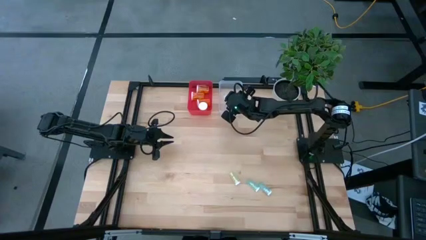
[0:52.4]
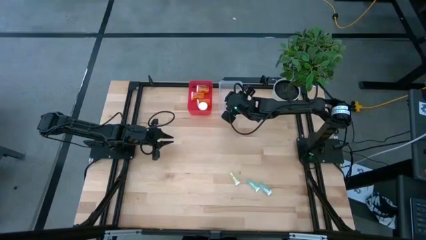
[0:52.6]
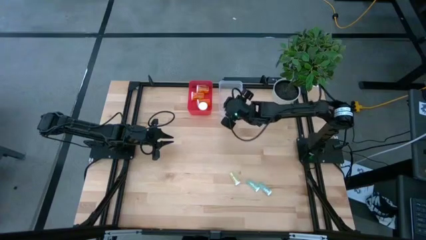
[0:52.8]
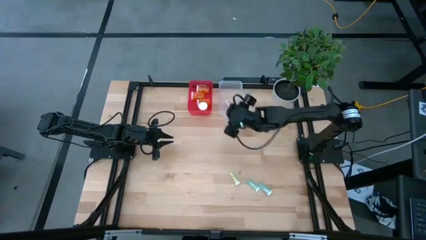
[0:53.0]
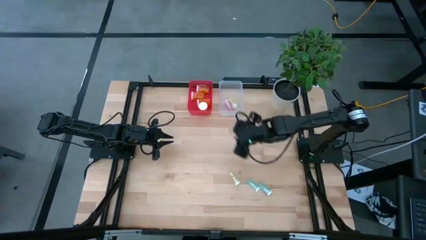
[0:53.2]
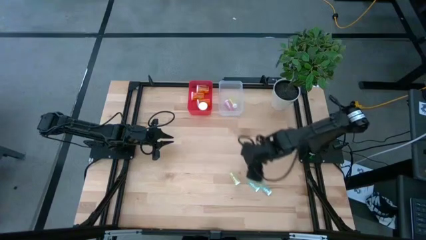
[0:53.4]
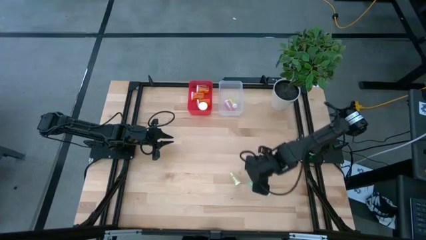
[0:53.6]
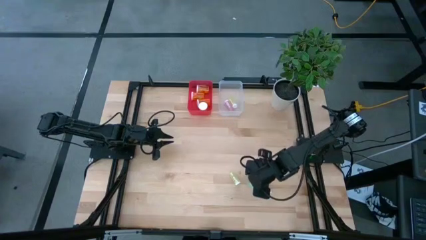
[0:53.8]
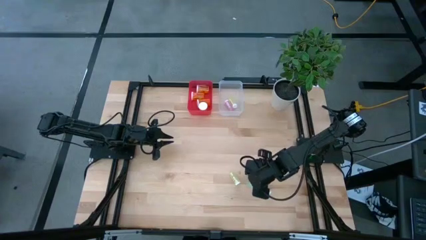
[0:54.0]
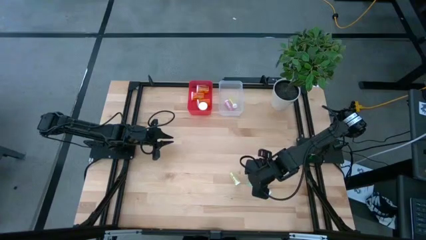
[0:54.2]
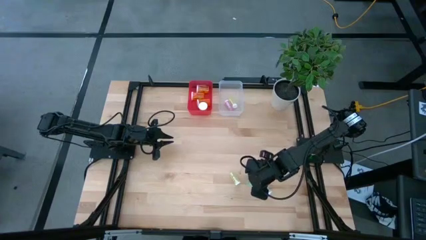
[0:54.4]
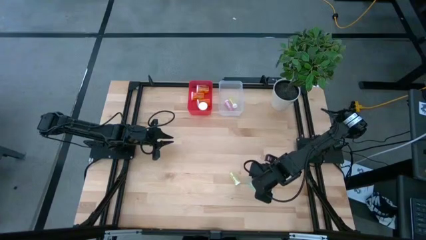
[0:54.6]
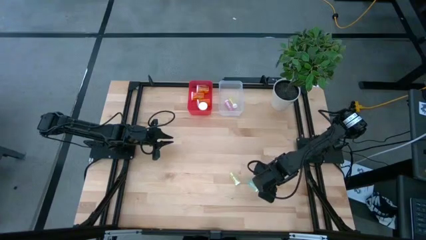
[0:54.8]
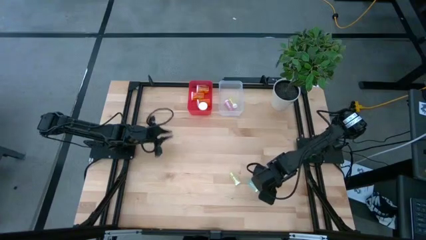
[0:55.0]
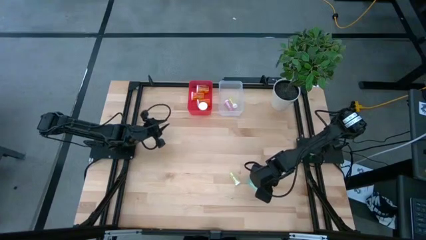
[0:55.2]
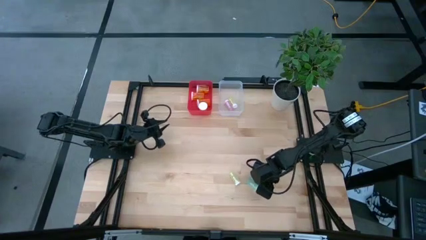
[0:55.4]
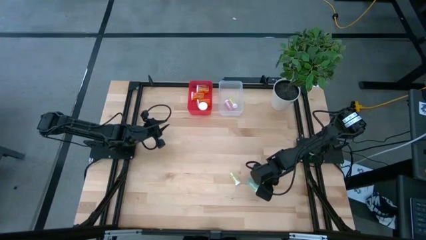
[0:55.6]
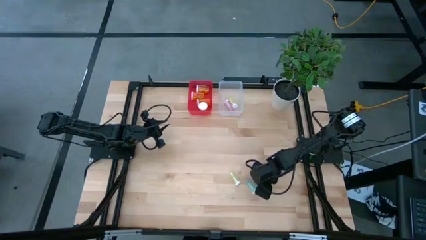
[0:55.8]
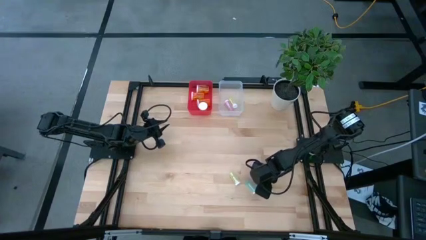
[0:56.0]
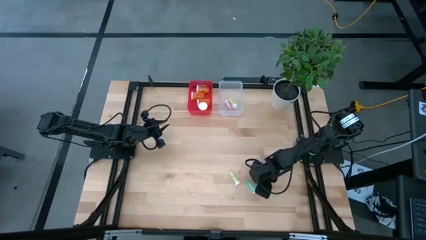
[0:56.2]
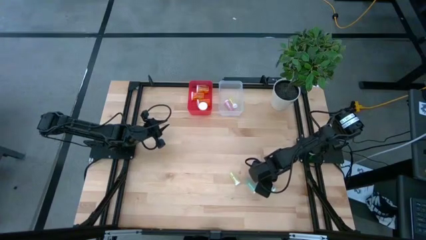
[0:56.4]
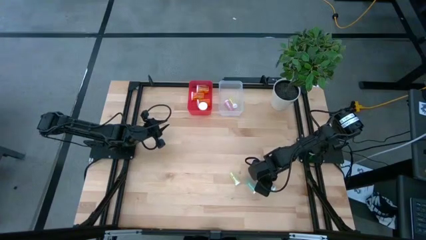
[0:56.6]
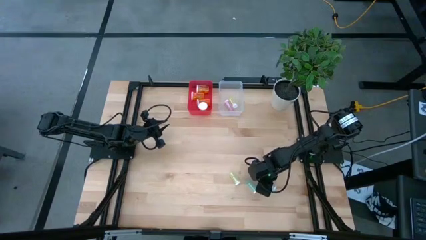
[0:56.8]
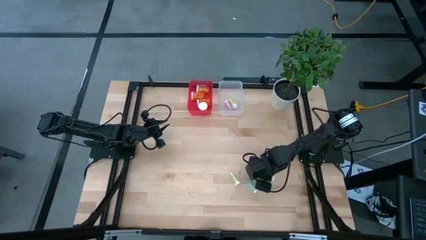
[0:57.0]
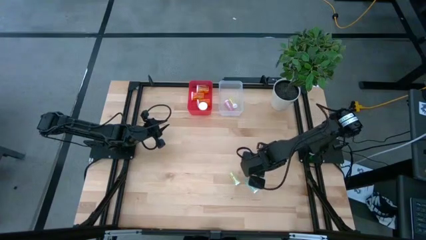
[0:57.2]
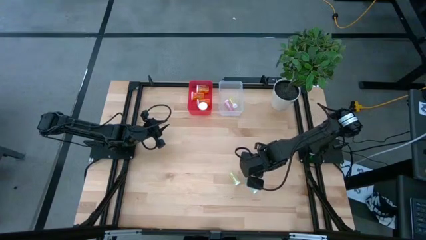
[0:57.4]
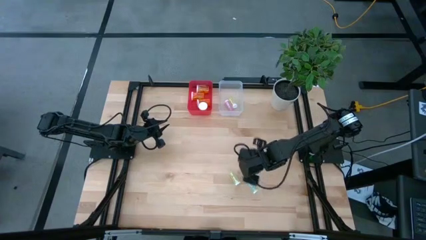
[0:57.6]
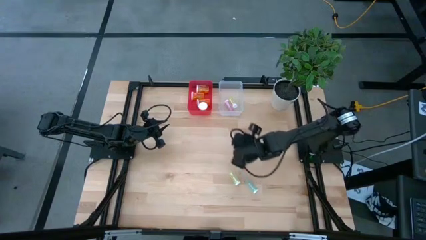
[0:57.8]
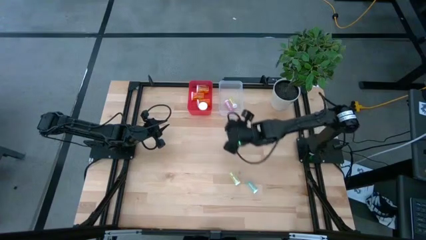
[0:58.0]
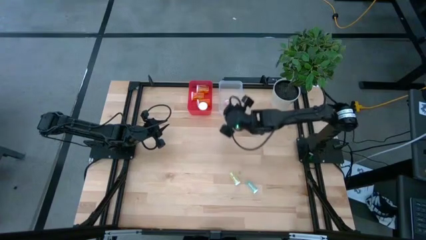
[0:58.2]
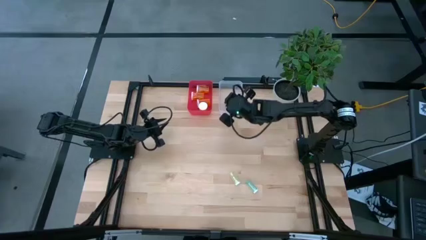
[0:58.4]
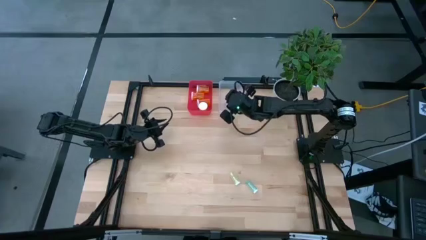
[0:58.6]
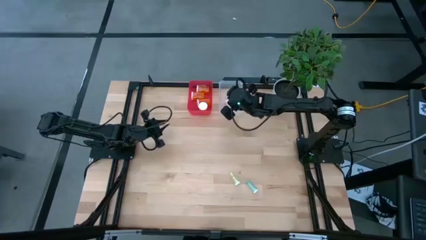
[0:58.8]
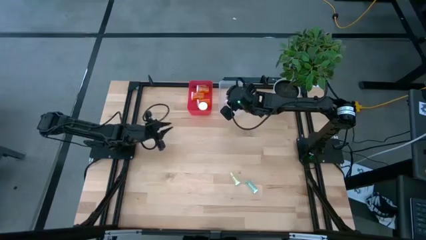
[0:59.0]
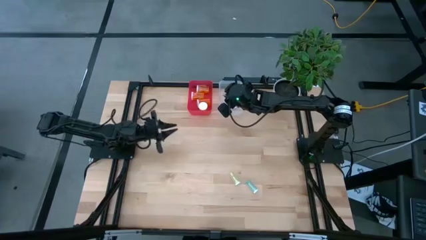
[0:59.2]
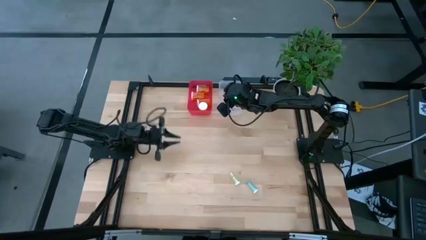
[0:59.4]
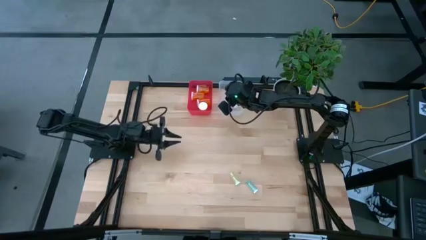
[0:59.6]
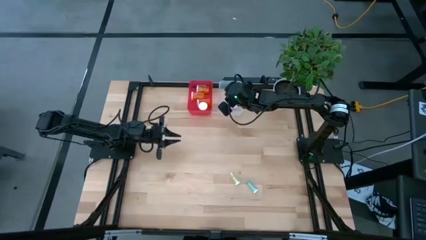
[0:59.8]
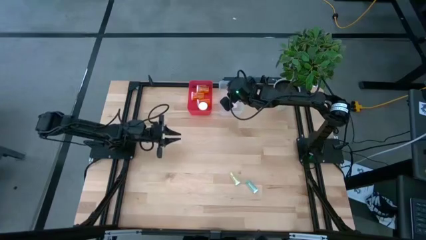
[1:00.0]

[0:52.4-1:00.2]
Task: Pick and place medicine bottles into bin by pill shape (circle, oval)
Put the small blue pill bottle into the transparent bin

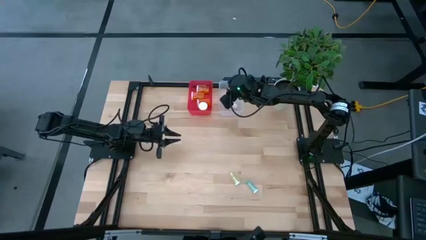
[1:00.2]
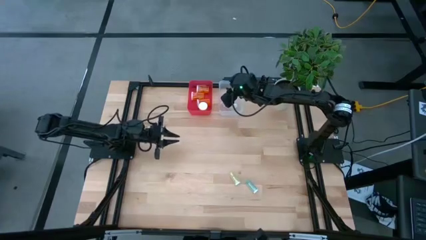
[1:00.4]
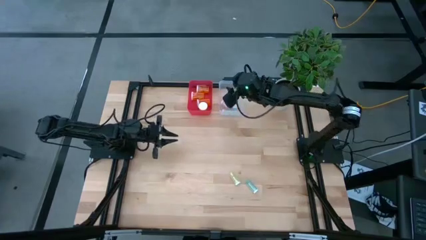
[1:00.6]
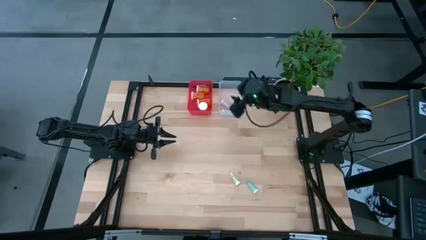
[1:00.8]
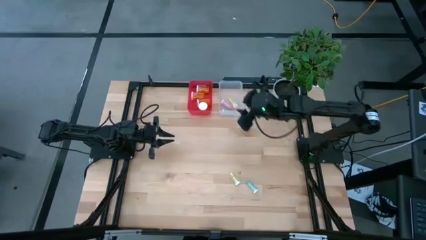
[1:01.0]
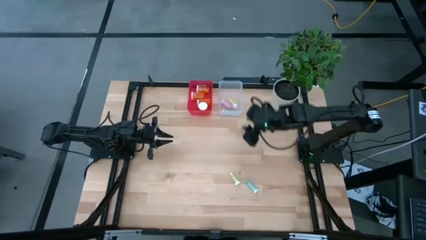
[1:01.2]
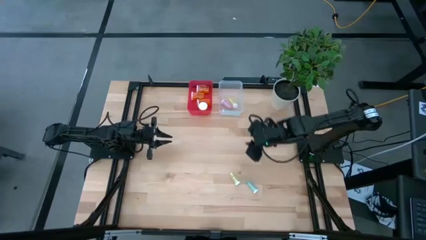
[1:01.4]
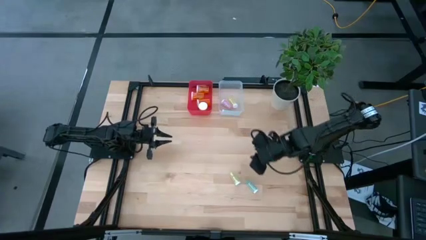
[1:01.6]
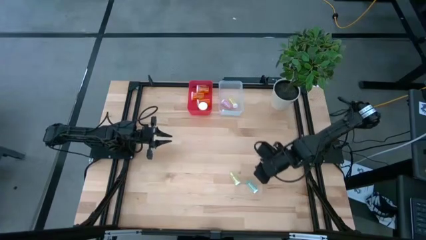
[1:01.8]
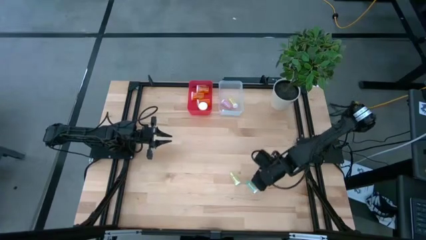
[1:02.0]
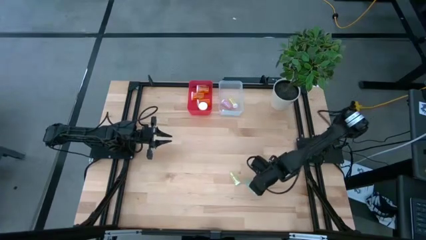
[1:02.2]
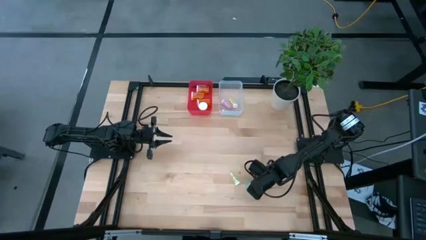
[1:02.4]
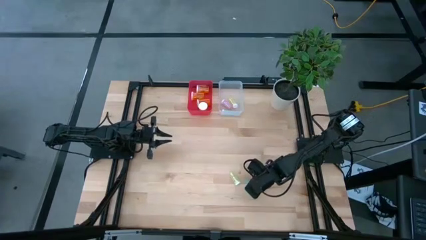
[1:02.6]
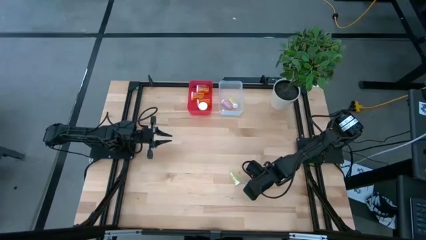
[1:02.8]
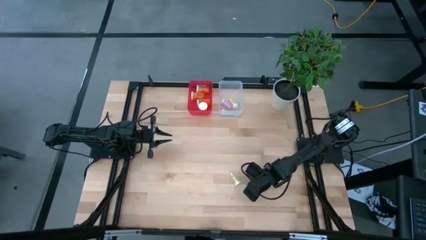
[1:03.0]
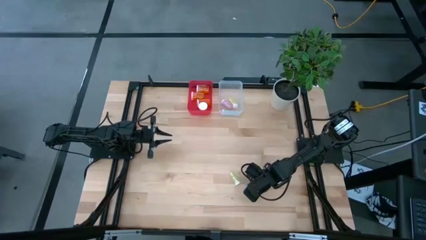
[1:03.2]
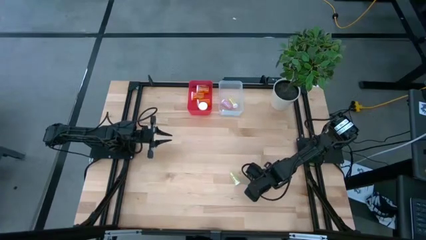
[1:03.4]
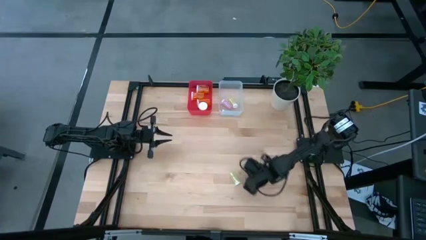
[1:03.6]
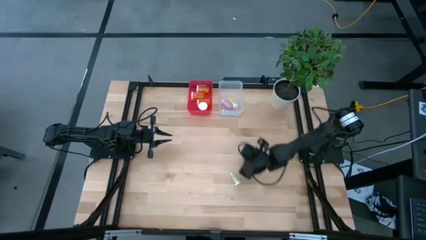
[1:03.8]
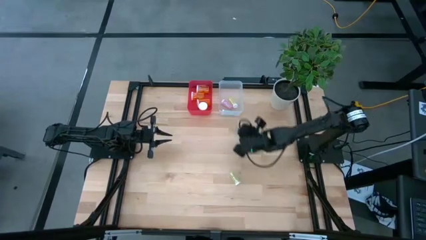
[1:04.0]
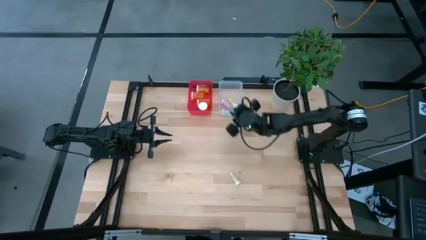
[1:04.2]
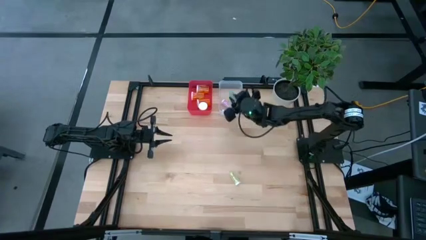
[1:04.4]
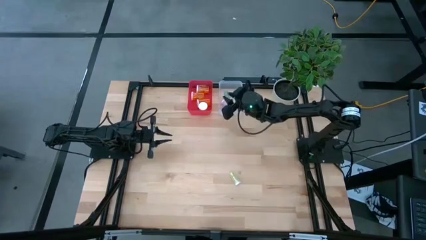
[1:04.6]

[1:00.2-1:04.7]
Put the small blue pill bottle into the transparent bin

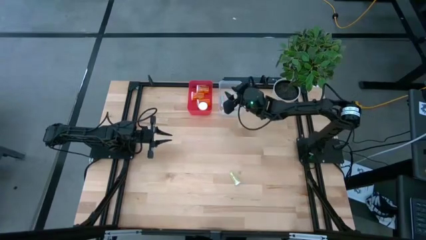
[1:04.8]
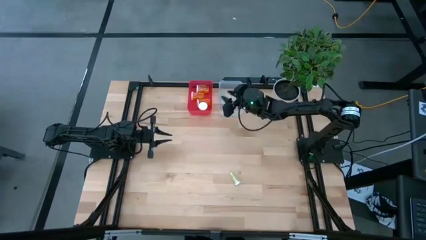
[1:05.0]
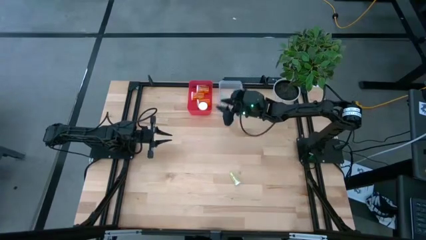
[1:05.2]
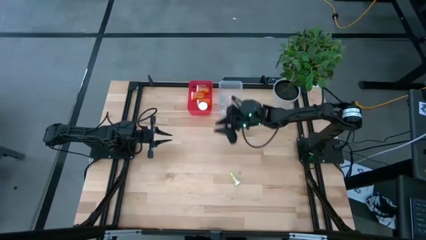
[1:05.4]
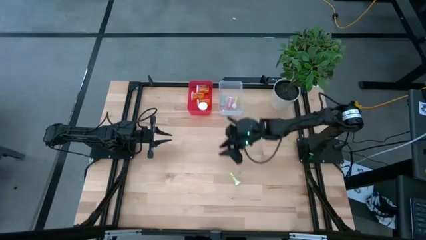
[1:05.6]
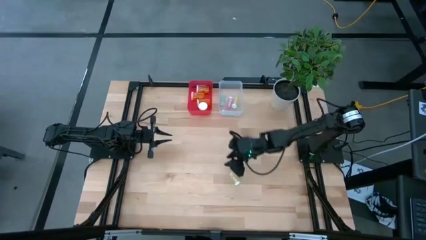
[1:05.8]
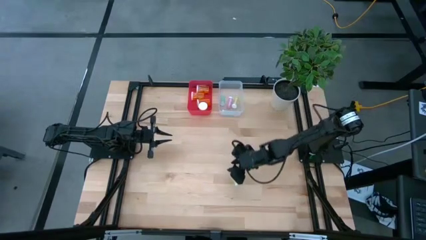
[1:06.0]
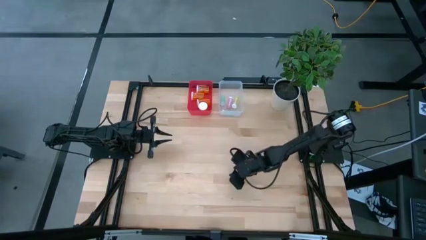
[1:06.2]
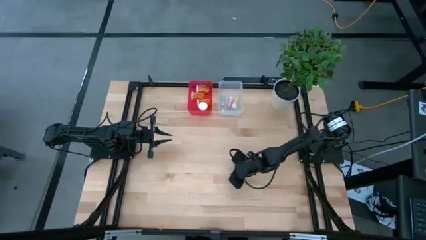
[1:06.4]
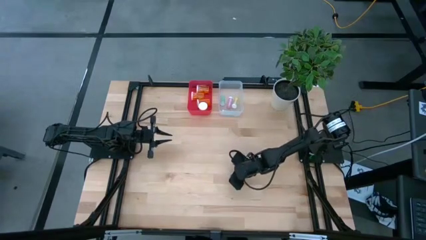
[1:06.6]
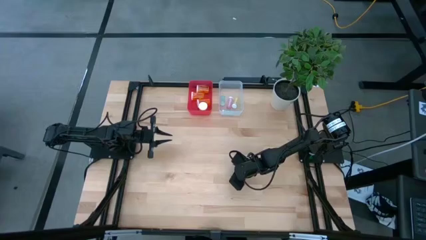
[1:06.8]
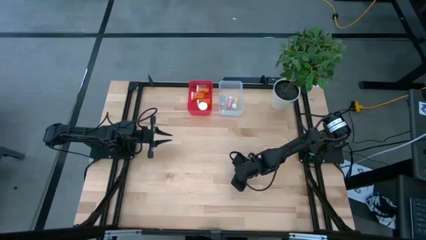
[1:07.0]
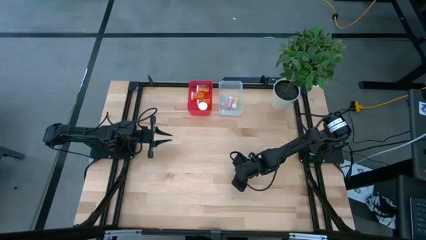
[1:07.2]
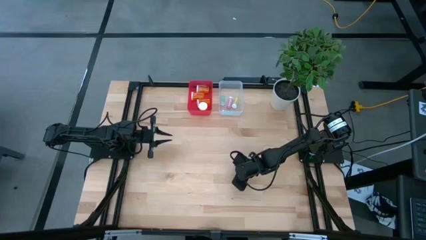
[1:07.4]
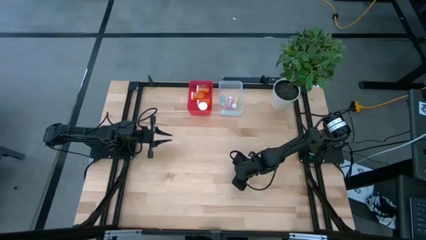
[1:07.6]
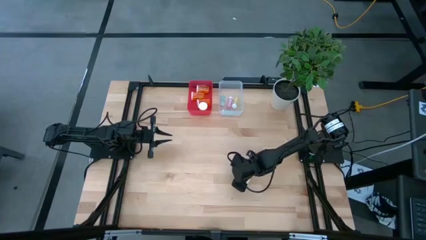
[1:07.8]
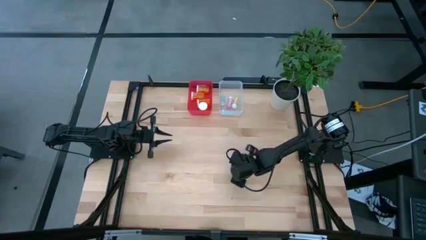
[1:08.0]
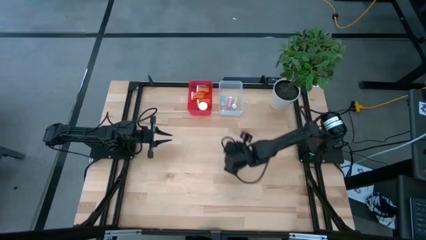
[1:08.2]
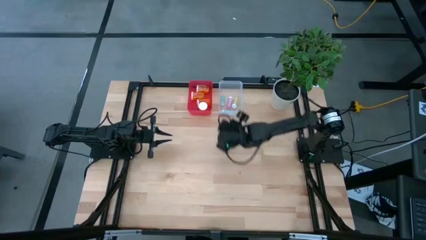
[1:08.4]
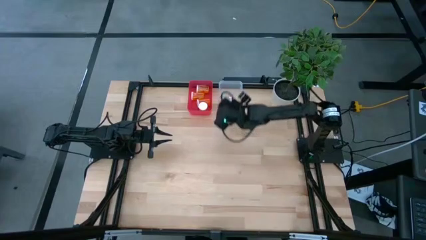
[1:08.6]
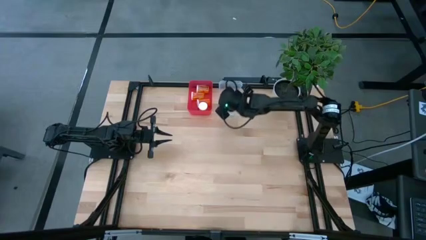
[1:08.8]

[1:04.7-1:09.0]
Put the small yellow pill bottle into the transparent bin

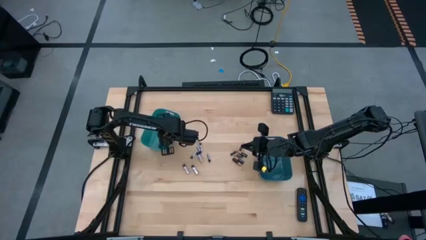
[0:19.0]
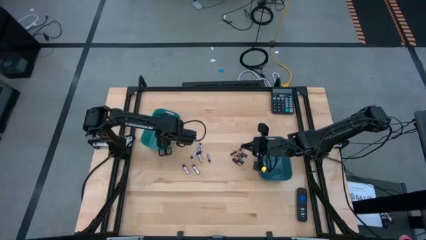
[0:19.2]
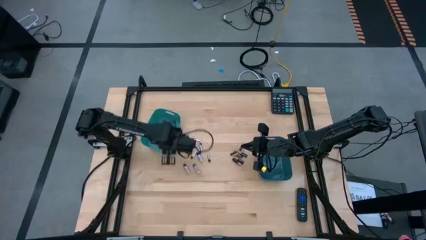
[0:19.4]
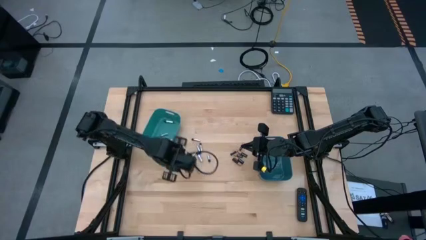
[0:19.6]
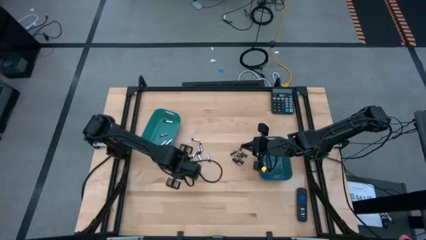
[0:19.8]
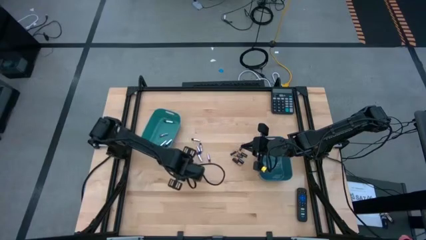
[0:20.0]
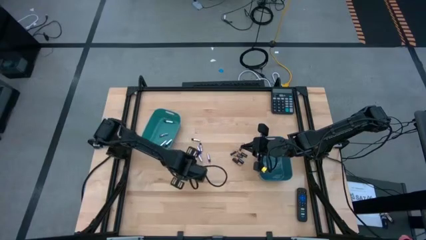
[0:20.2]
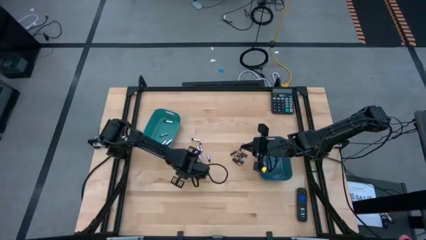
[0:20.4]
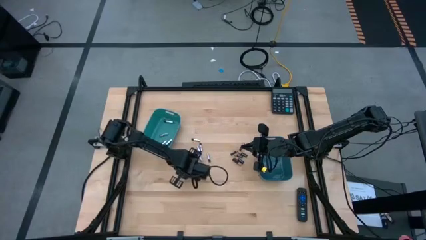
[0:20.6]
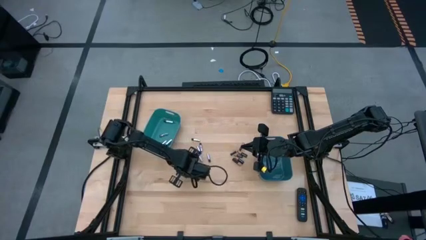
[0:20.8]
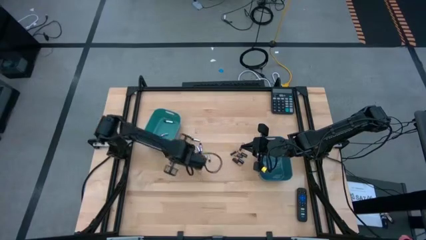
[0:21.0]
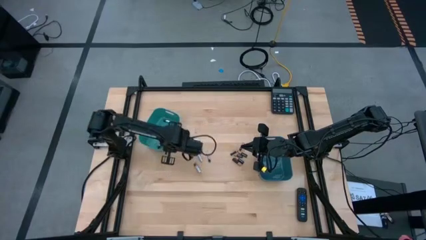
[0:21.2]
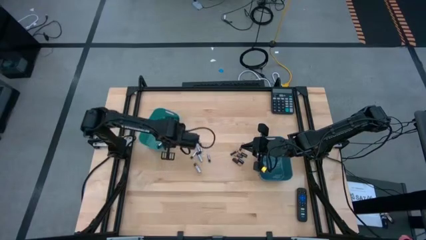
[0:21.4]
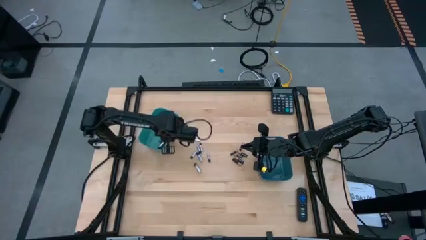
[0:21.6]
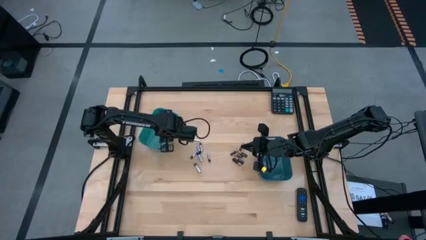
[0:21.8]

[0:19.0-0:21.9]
Task: Sort batteries
Put the silver battery into the green bin
